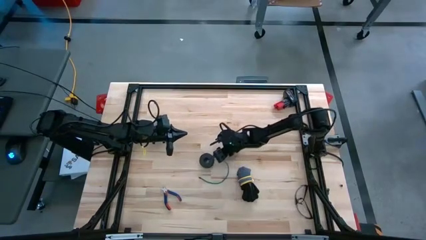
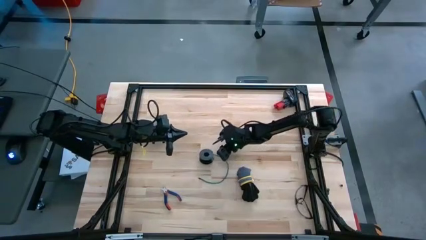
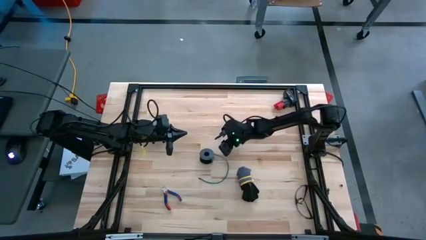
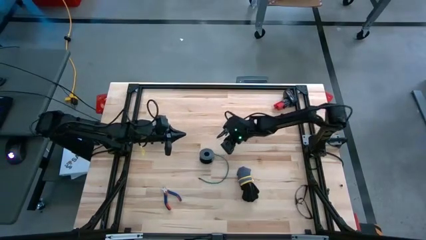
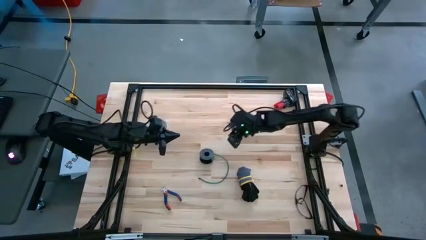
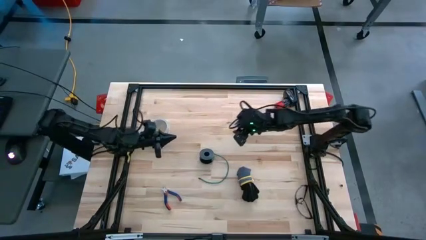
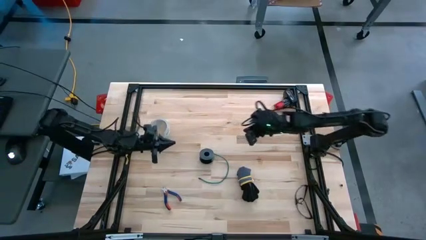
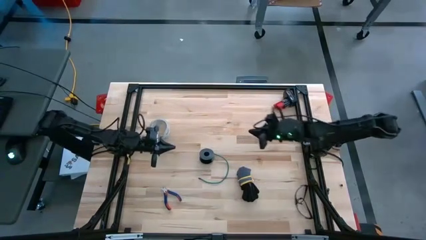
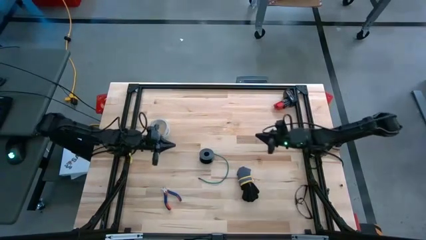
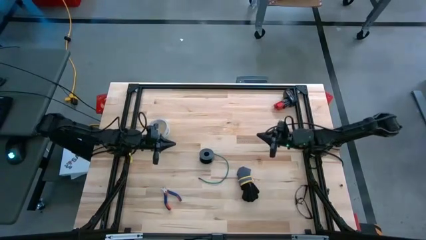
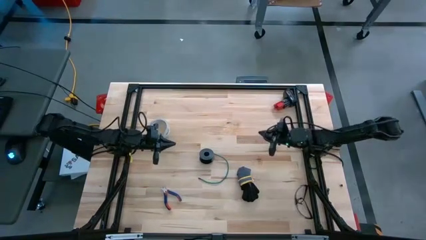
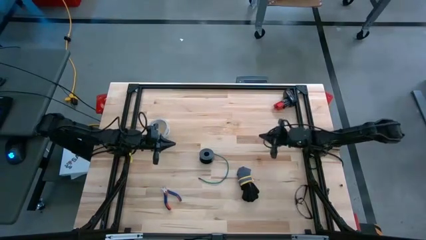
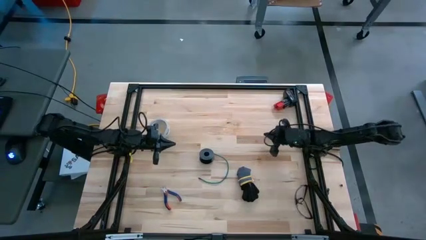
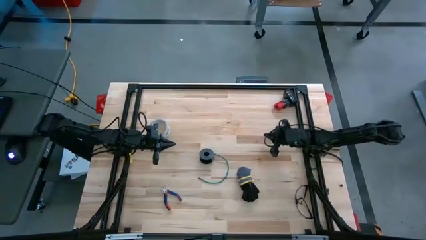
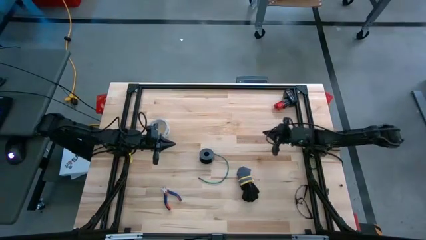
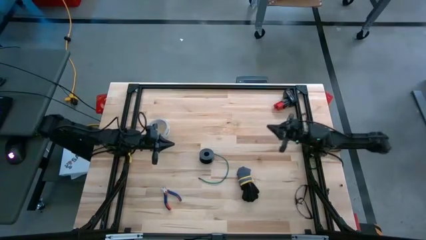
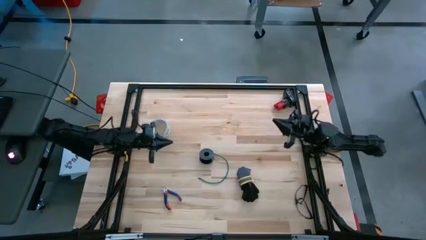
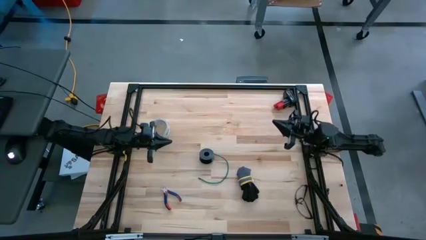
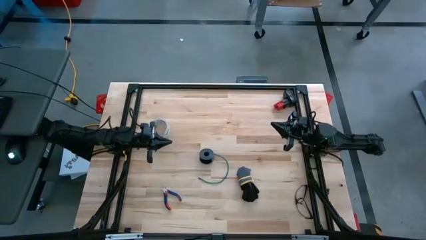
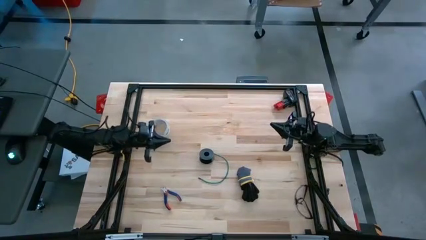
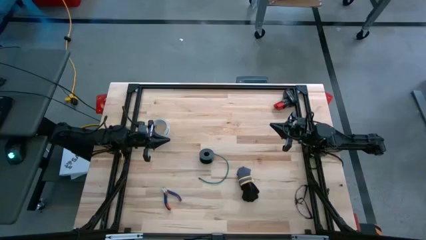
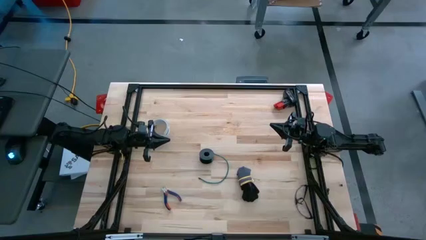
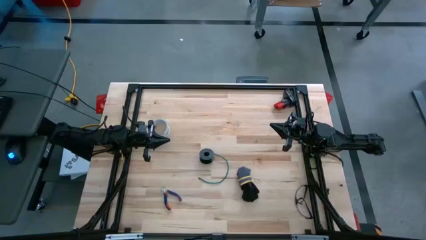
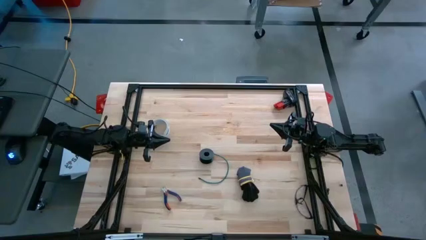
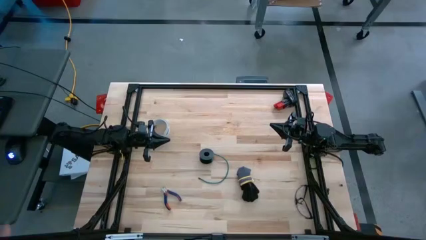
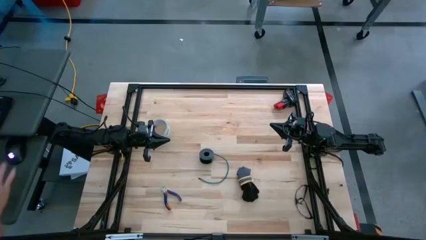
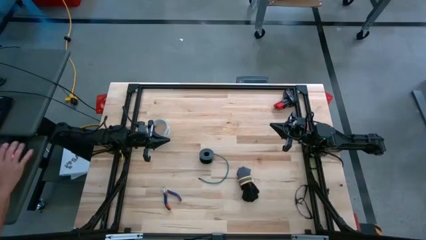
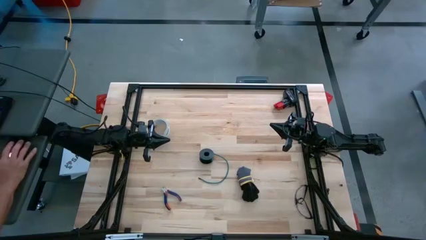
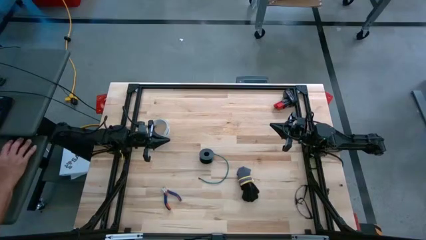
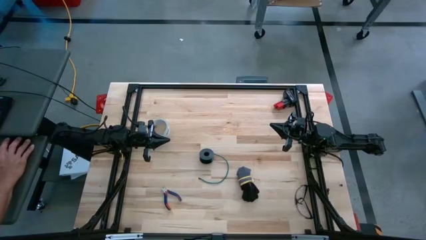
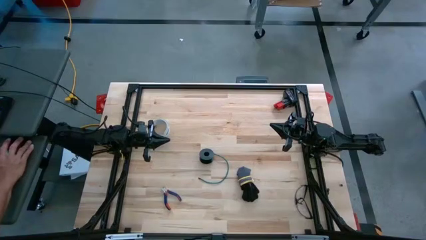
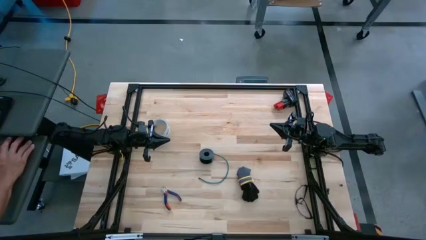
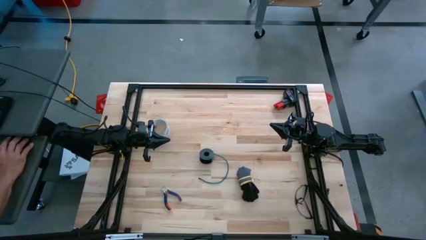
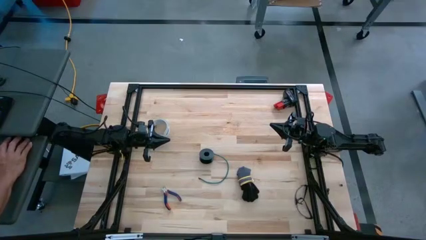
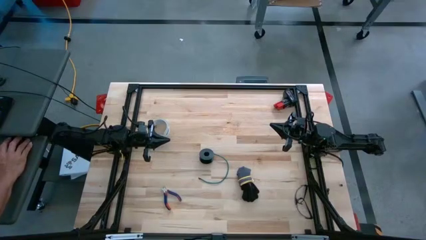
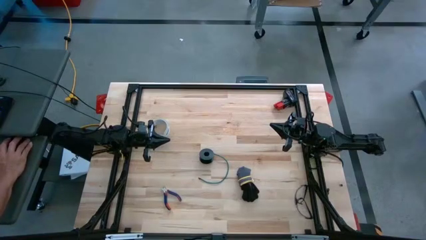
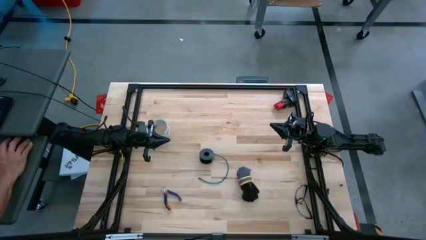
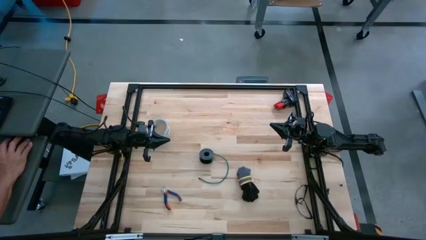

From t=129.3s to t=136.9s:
Task: Coil cords
Return to Home Position

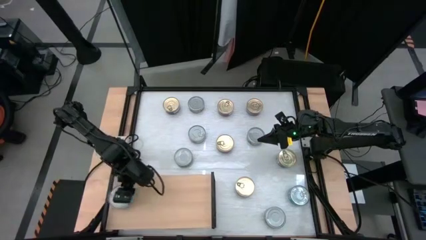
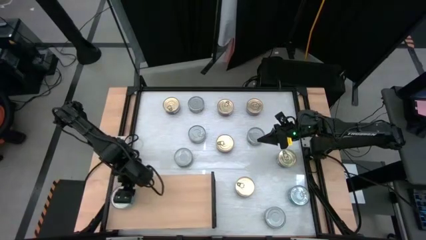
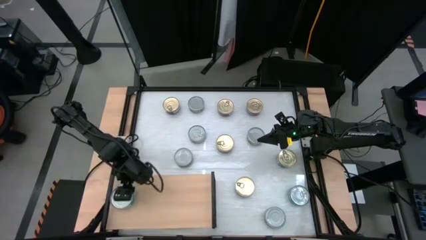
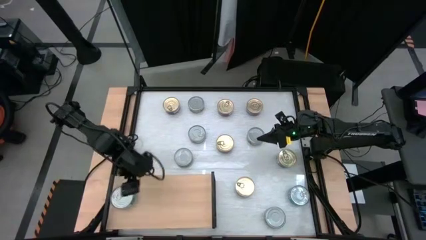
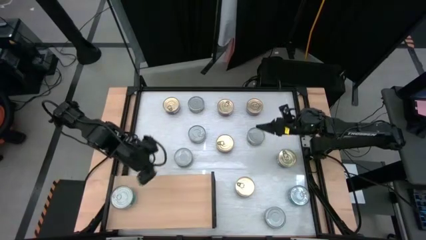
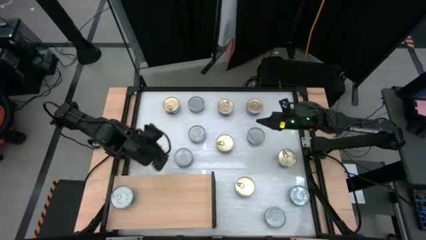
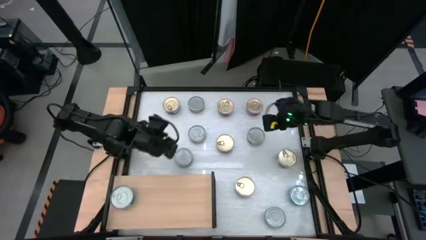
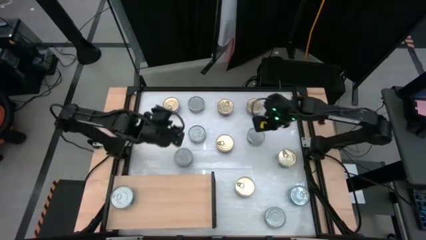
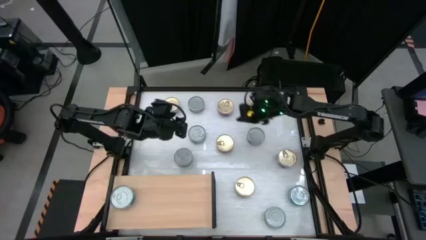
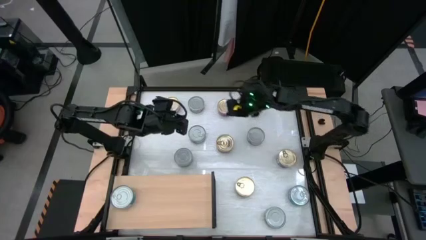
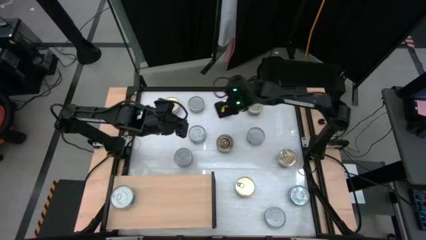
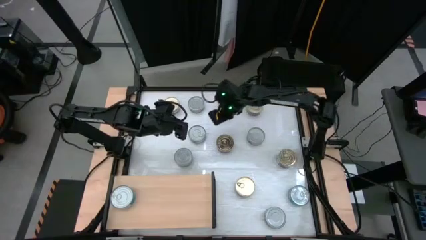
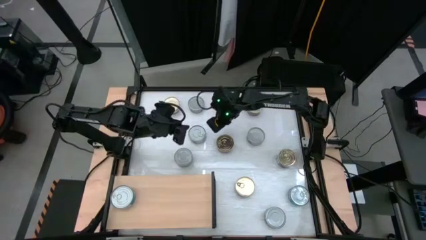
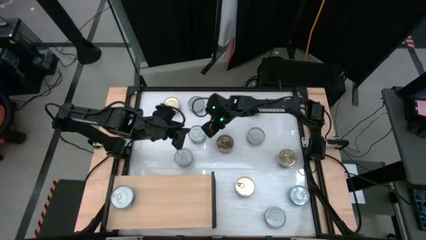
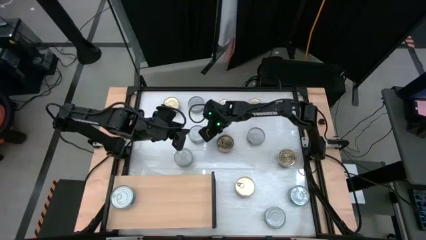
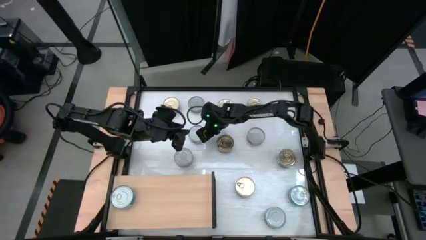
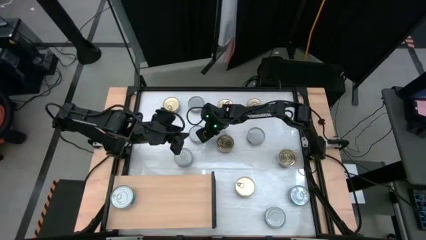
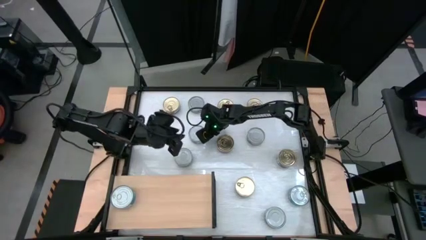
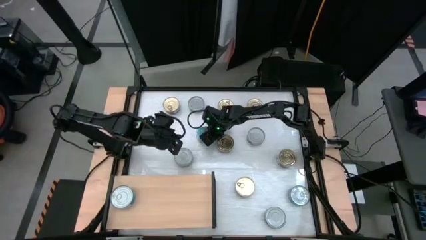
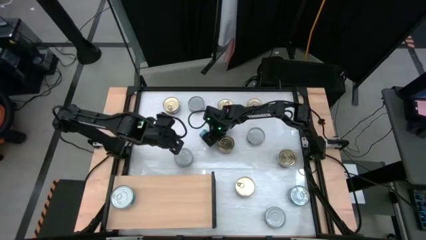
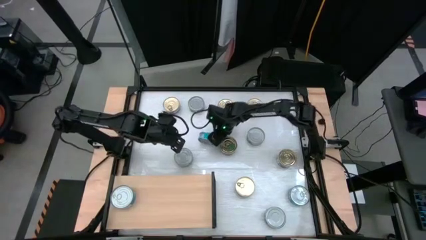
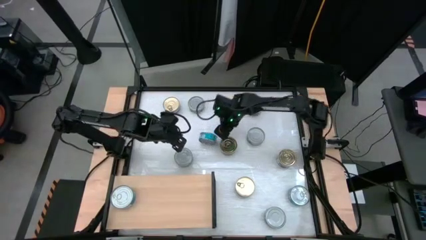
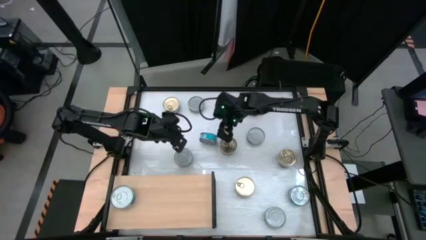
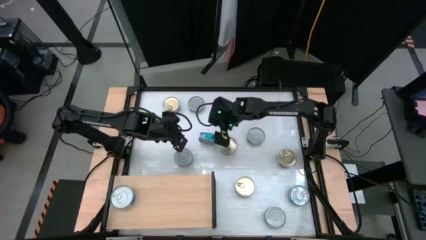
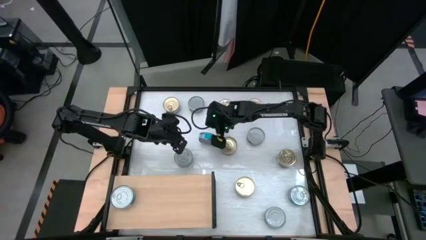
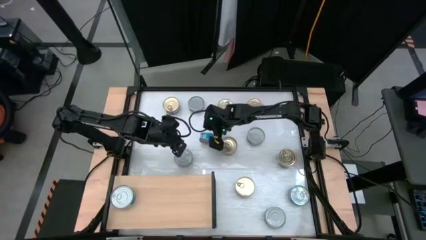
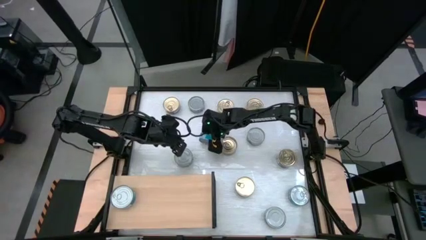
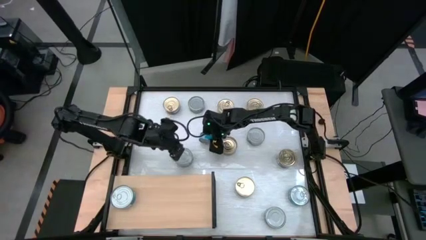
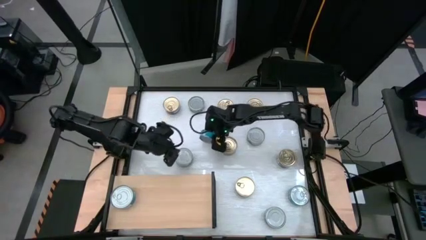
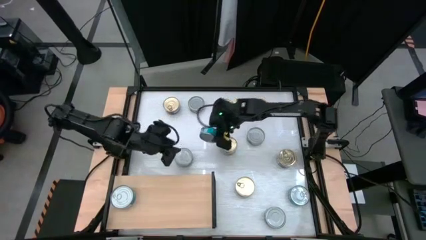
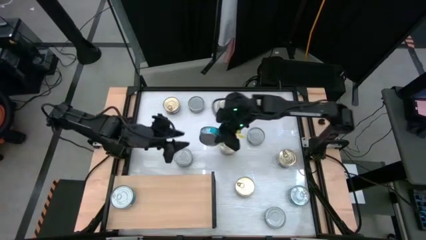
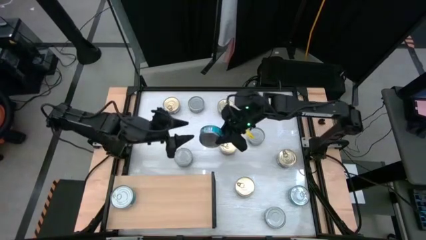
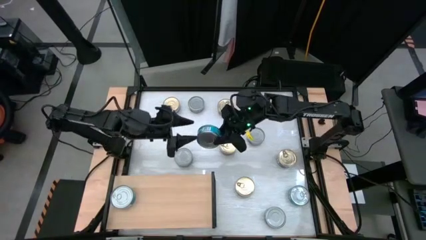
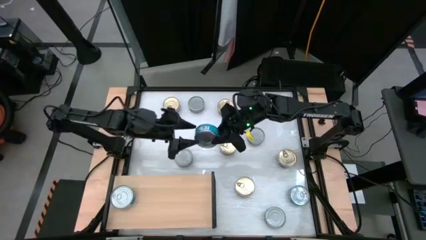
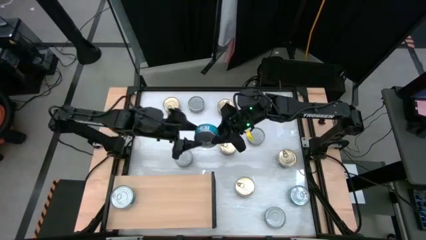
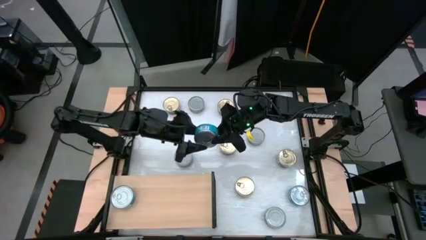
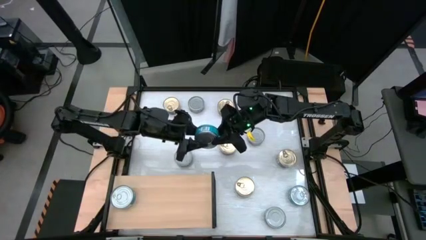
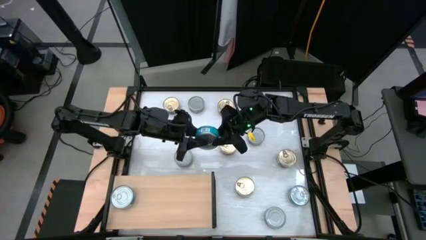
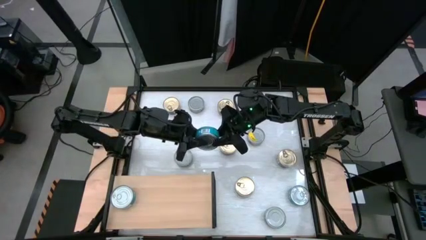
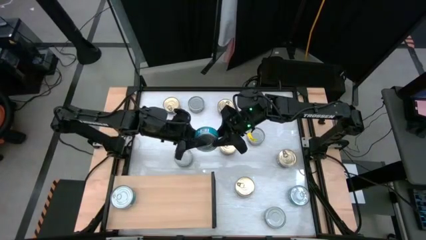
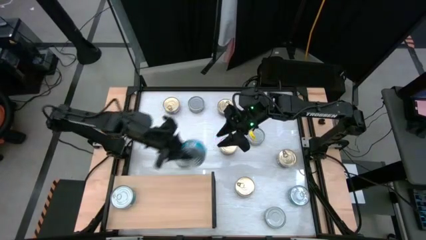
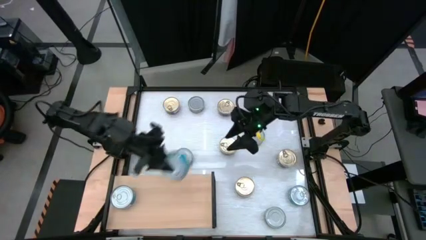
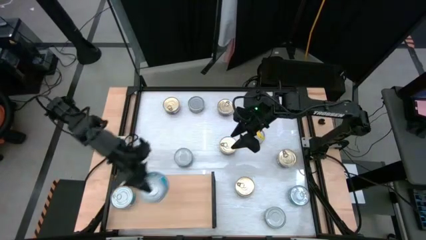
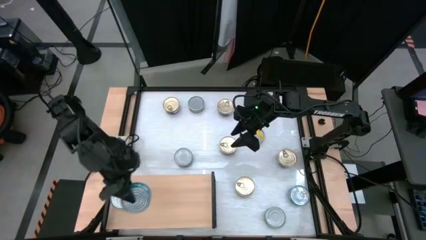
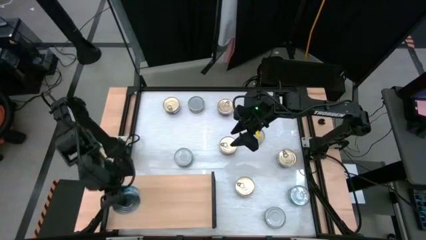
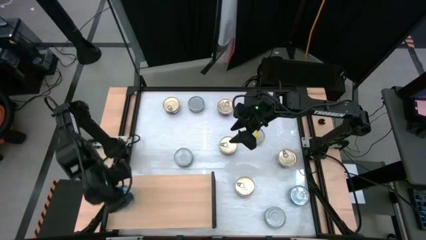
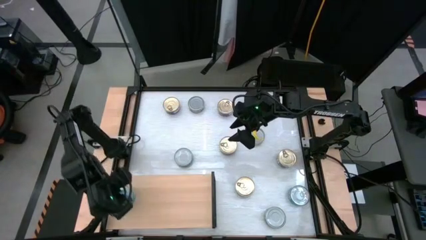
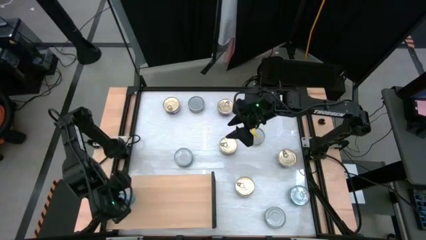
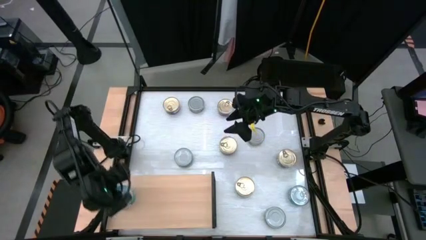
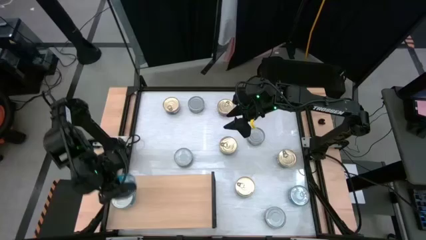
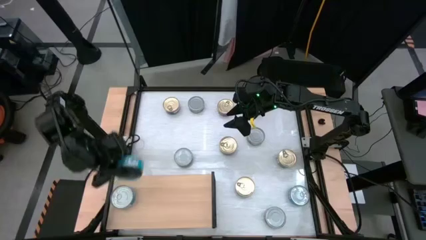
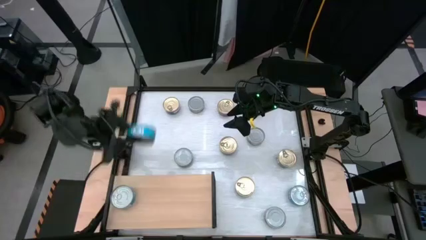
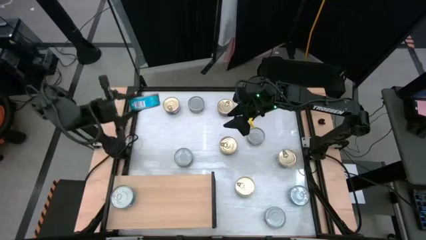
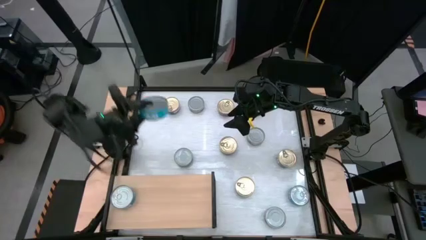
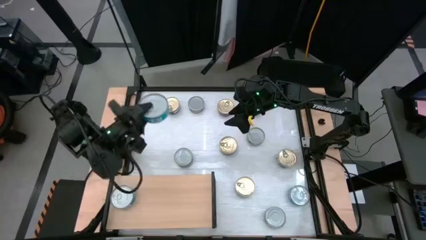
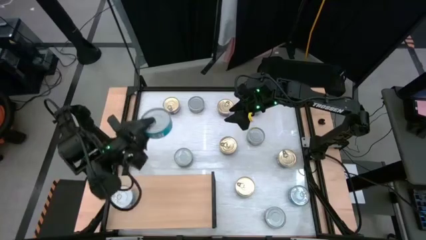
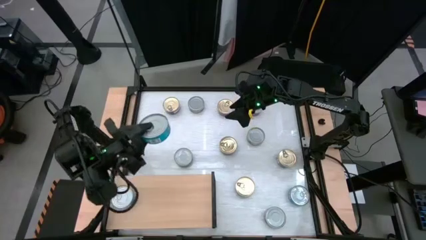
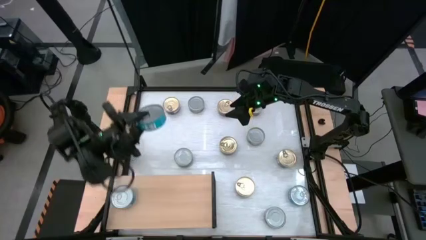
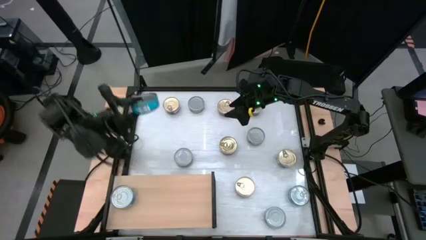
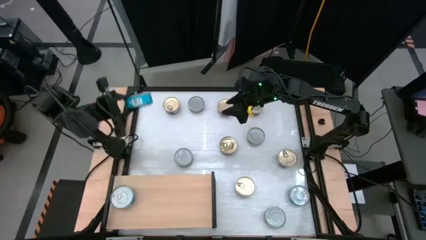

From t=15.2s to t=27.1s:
Task: Stack canned seafood by type on shelf
Stack the top yellow blue tuna can on top of the yellow blue tuna can on the shelf
